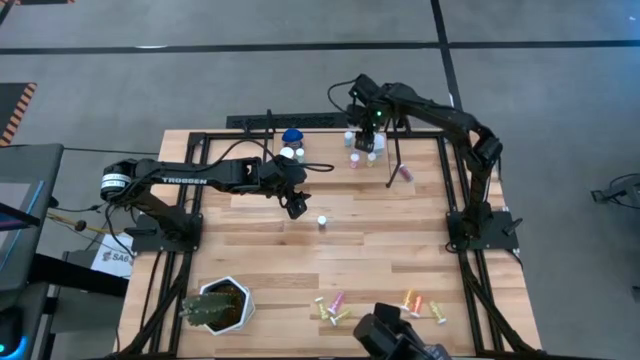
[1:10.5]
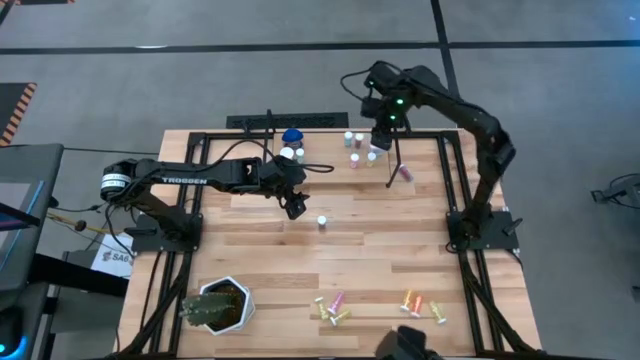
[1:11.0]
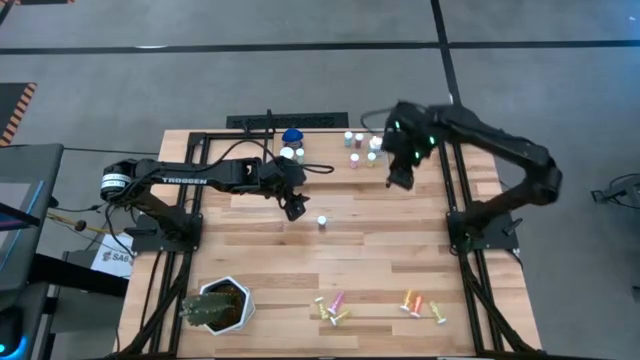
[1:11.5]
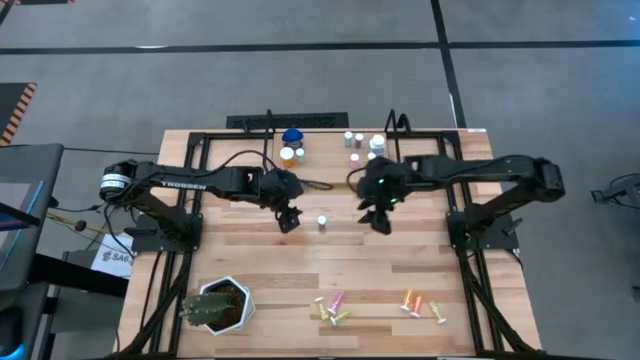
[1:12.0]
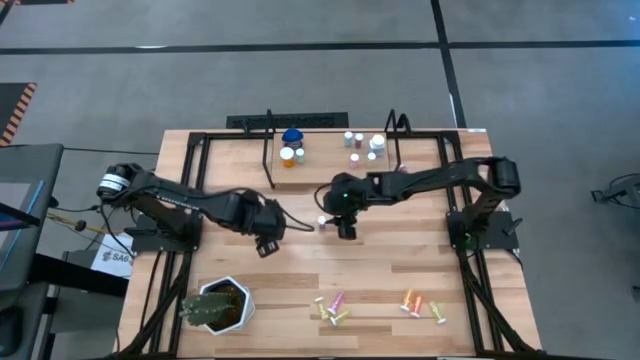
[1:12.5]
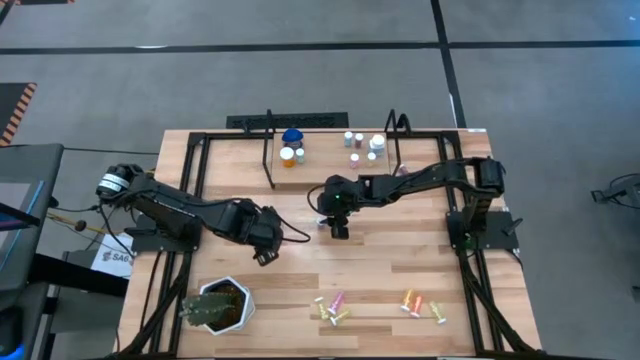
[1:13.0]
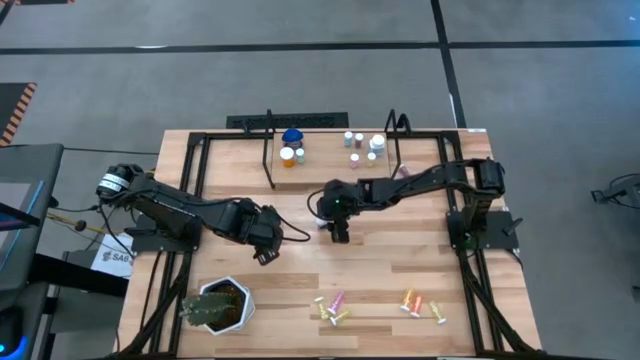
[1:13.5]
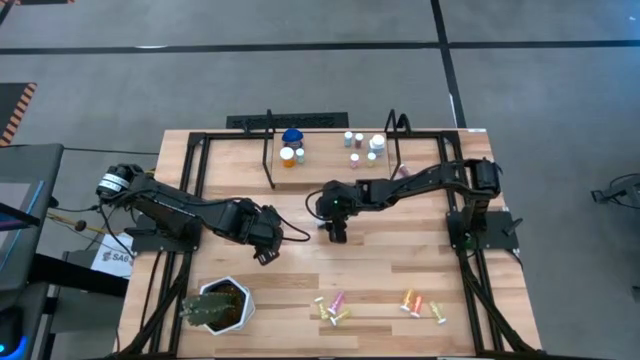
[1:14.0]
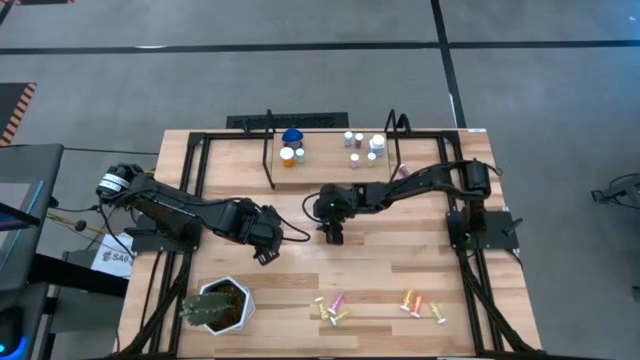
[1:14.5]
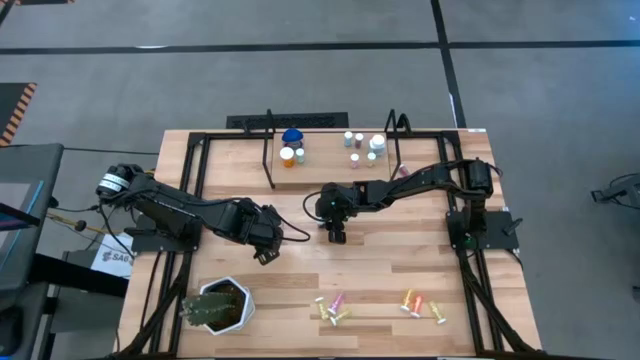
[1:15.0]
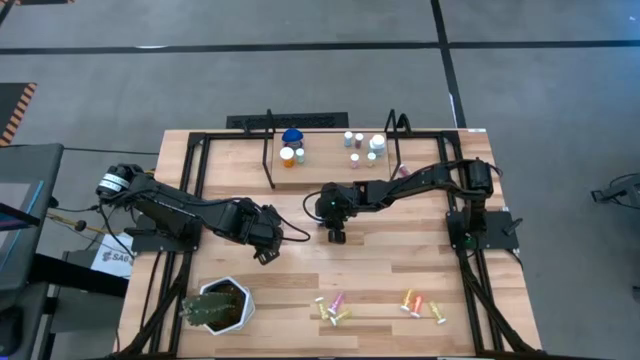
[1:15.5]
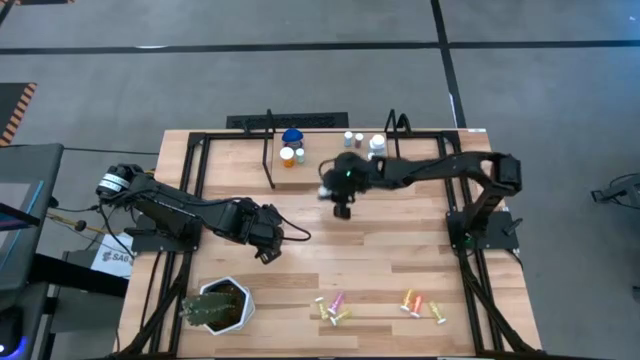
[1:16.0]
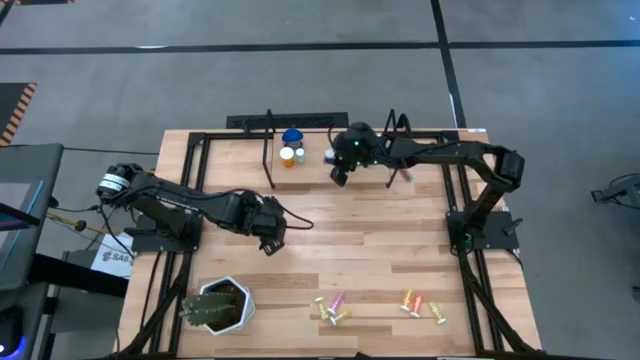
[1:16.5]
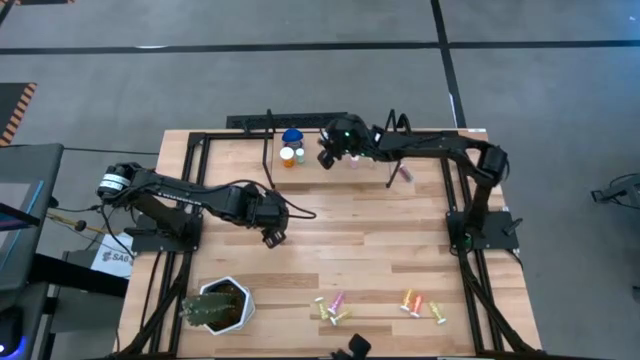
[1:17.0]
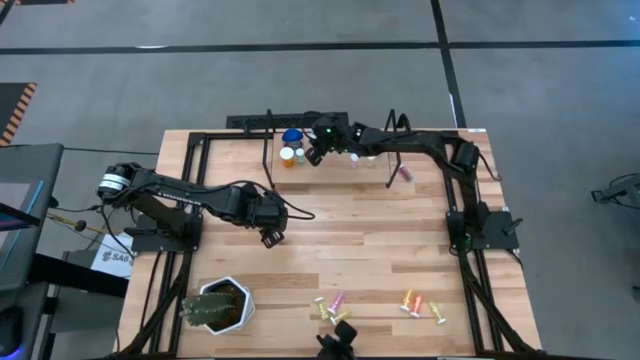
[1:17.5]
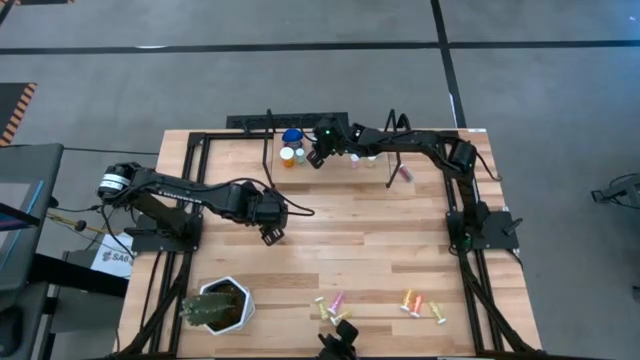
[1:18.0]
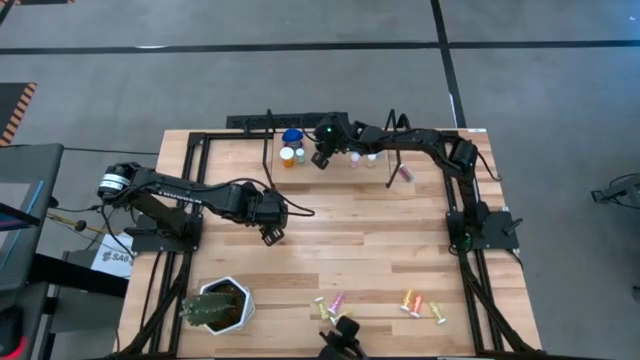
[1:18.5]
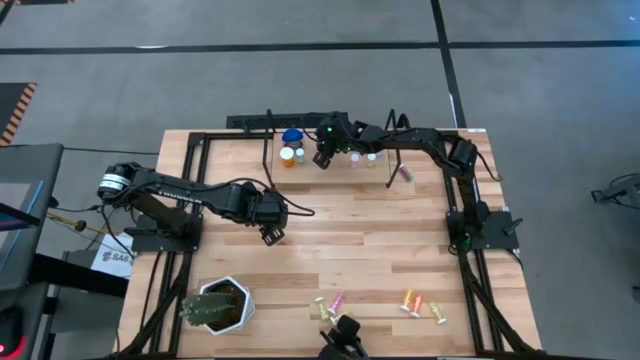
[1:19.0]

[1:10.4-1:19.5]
Task: Pick and place medicine bottles onto shelf by color
Put the blue pill bottle on the shelf

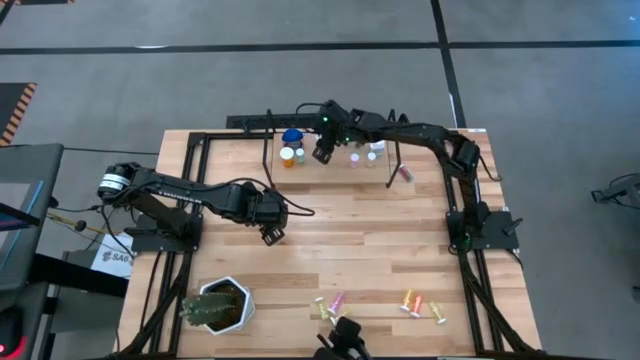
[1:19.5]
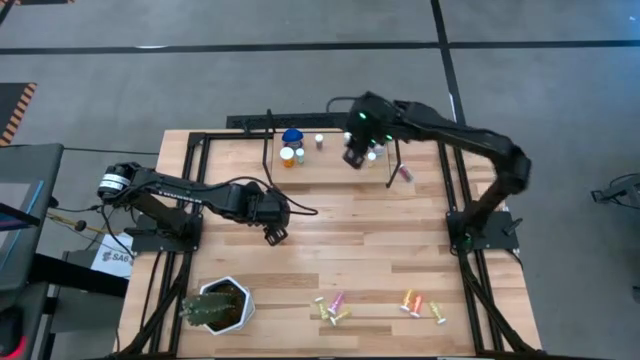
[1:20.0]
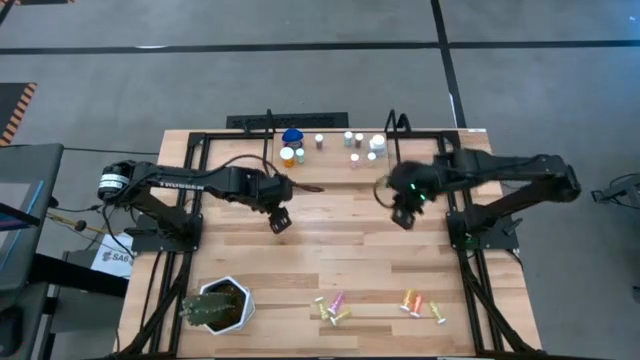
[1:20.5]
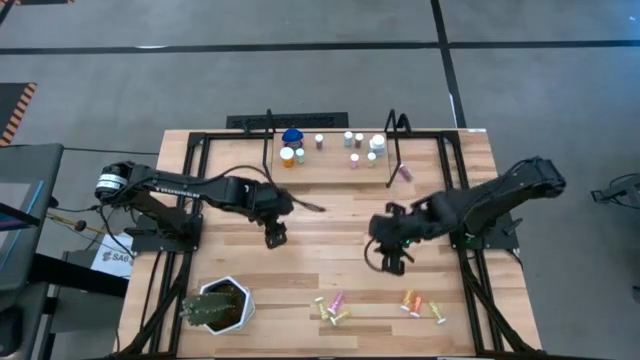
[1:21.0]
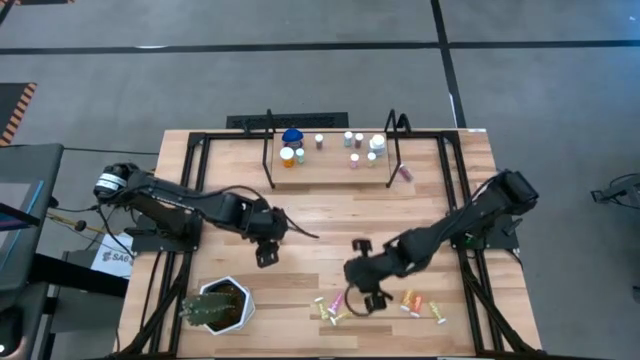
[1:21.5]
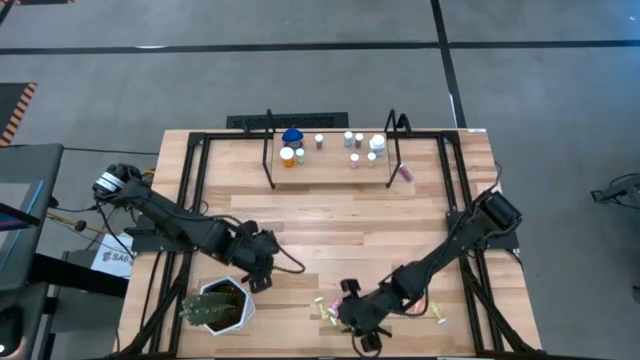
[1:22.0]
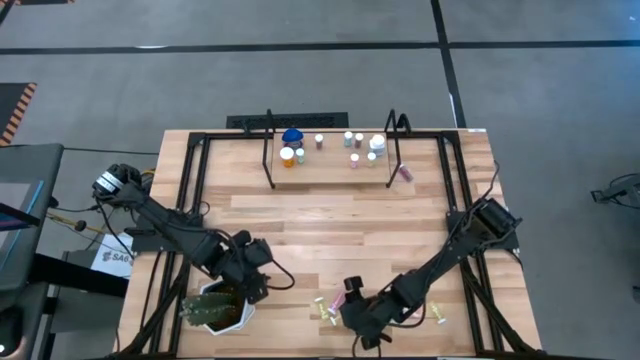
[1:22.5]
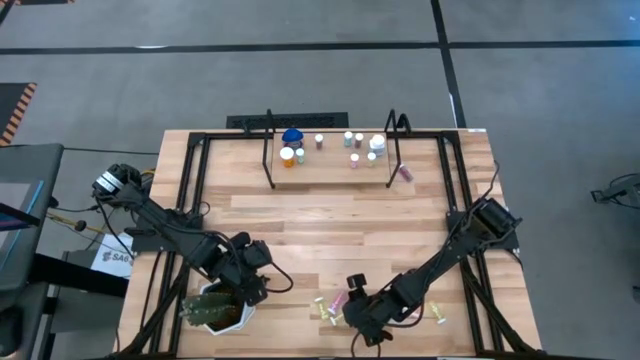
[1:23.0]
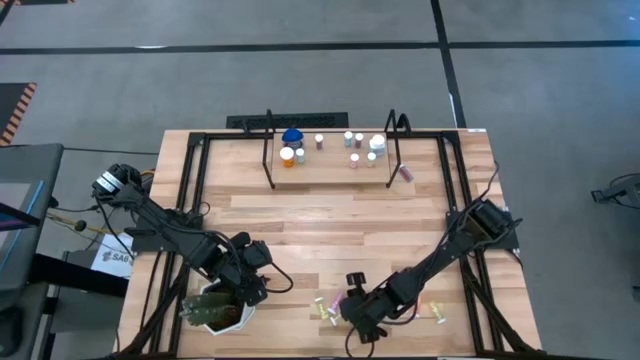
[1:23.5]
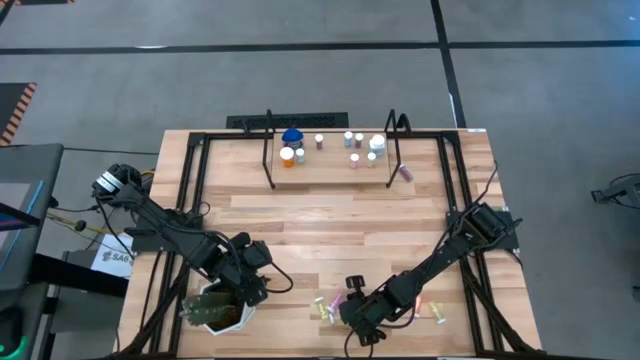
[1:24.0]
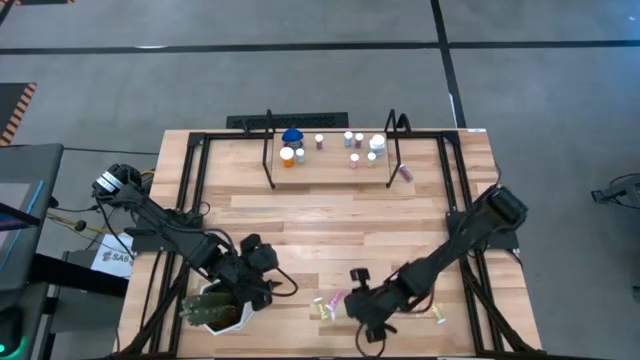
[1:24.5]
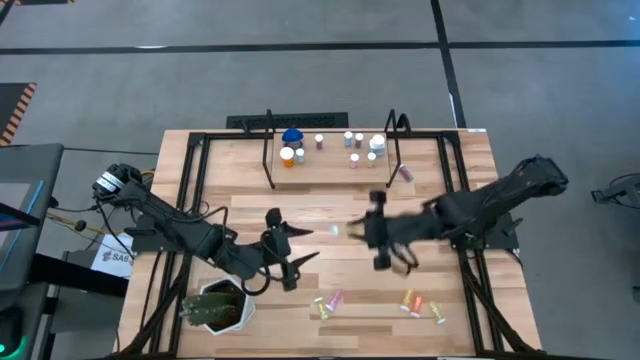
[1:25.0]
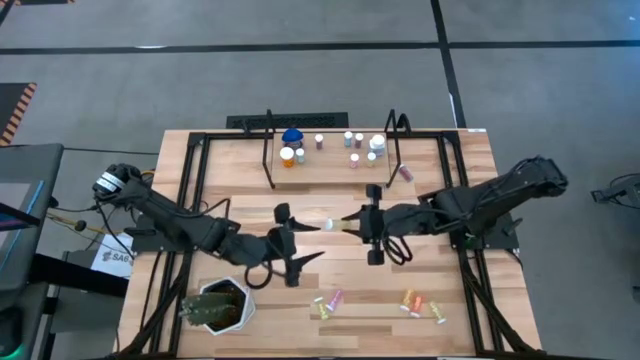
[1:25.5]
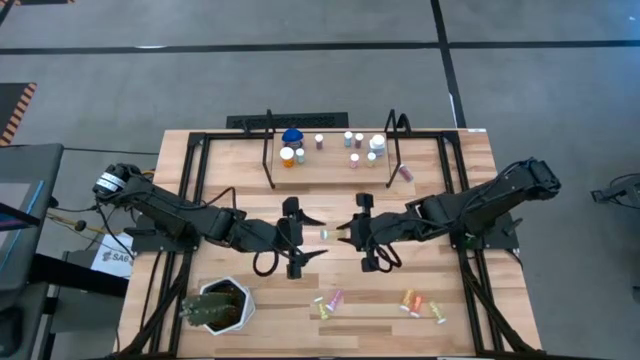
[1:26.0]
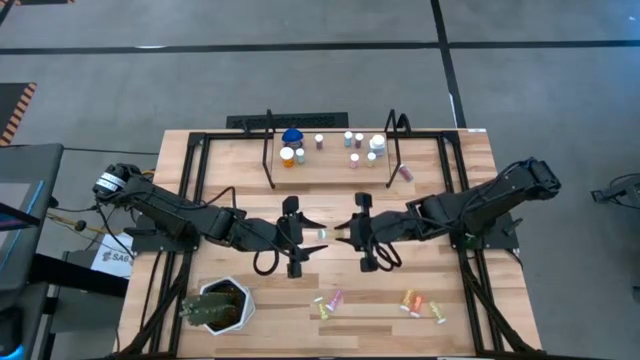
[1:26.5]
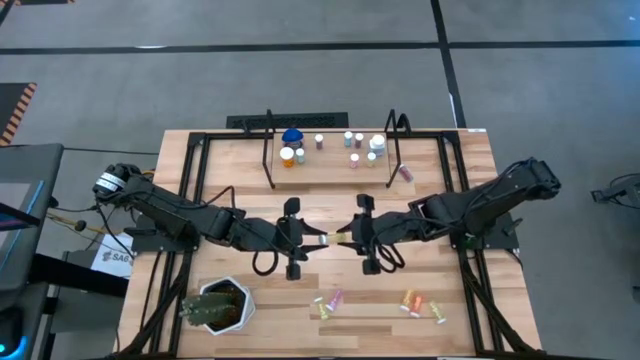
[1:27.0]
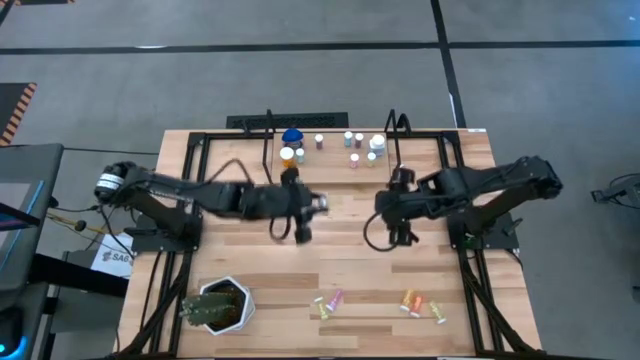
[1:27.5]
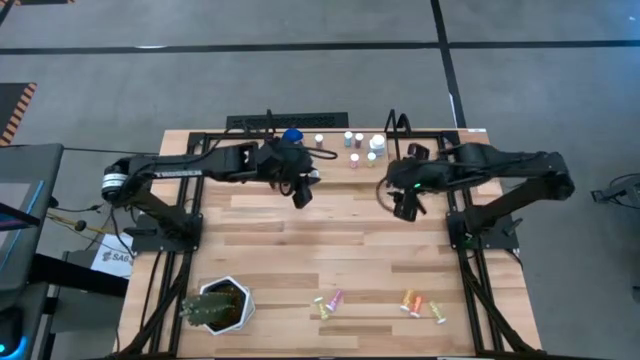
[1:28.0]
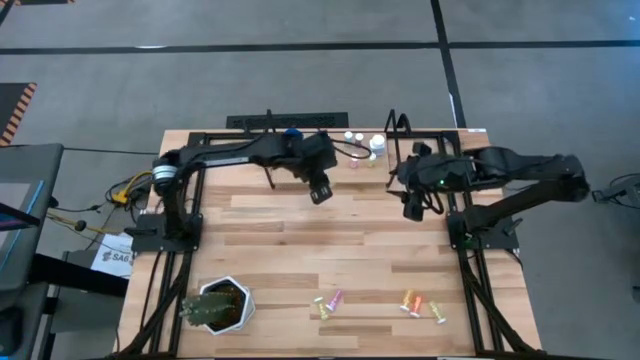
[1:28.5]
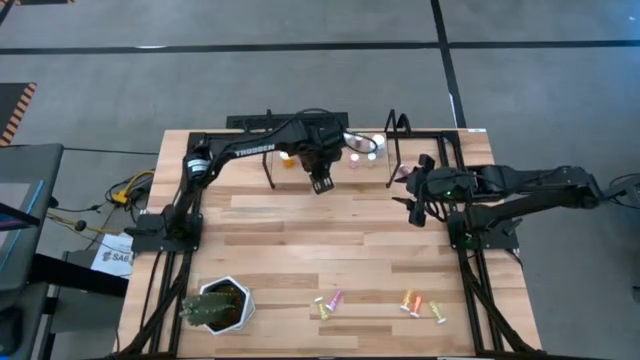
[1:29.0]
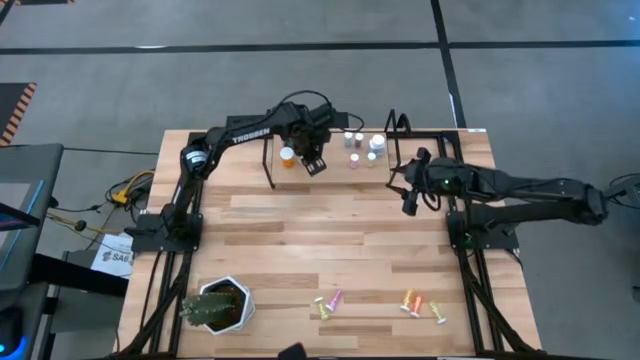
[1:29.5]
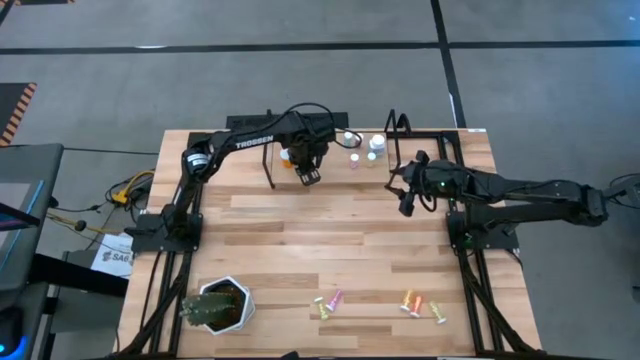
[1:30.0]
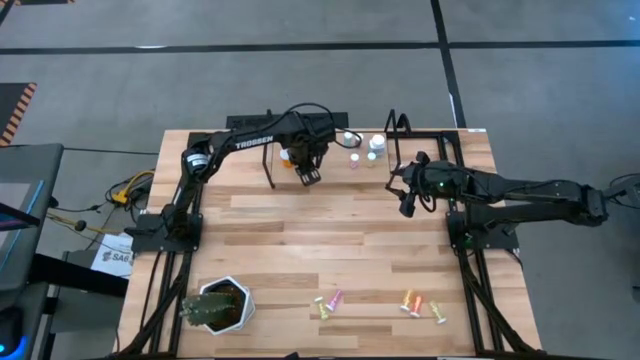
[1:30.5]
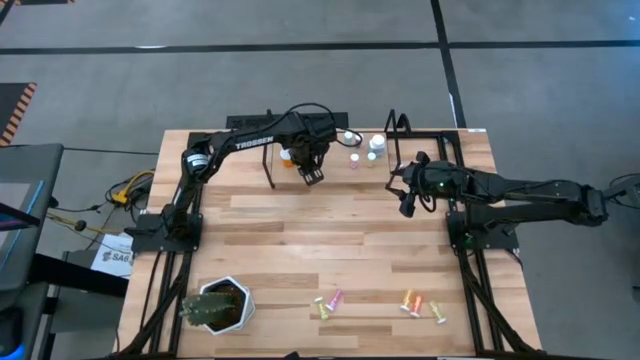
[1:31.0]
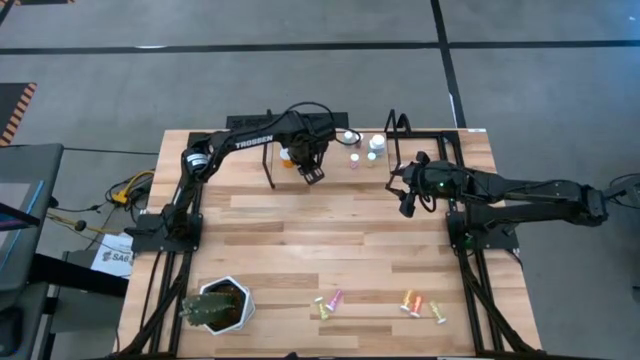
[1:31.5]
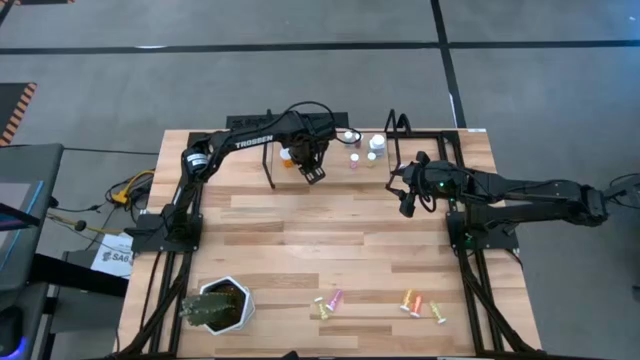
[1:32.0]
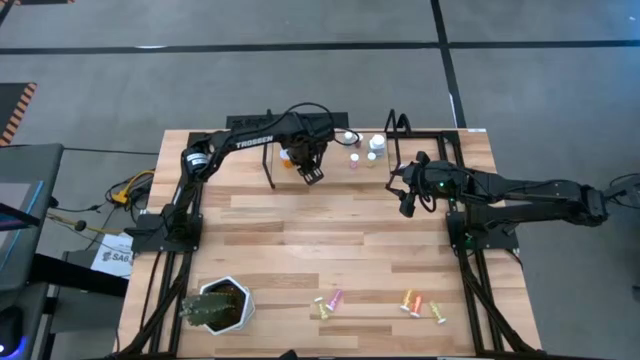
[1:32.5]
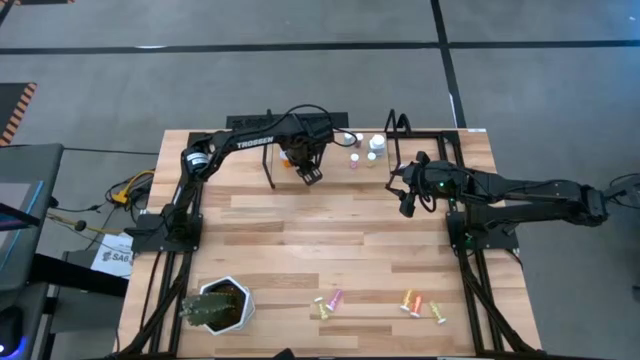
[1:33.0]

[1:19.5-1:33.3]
Put the yellow pill bottle on the shelf
